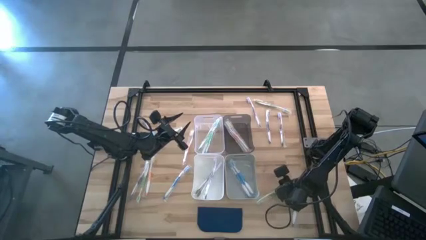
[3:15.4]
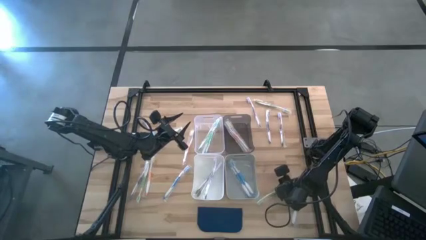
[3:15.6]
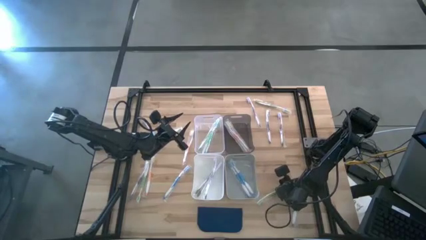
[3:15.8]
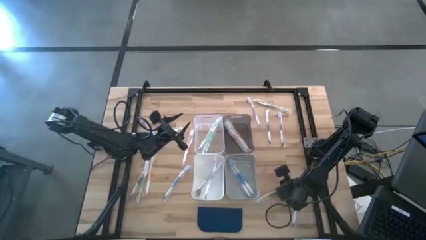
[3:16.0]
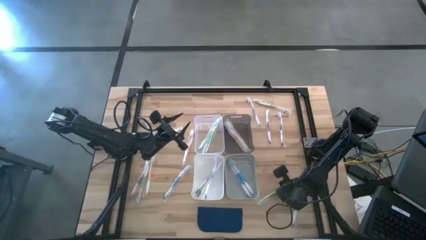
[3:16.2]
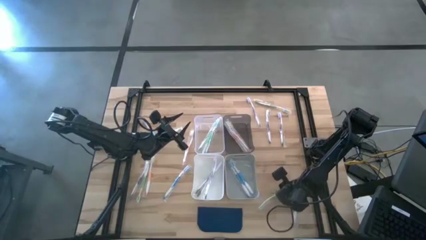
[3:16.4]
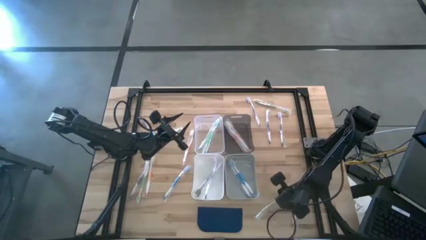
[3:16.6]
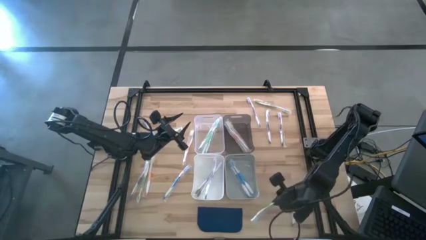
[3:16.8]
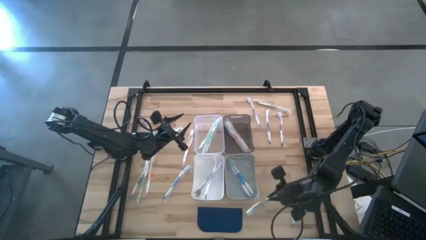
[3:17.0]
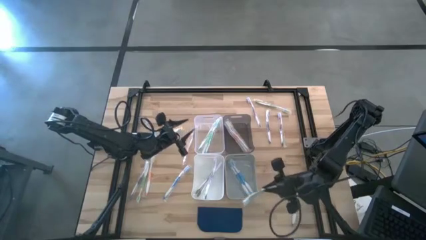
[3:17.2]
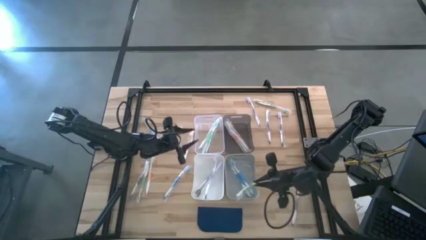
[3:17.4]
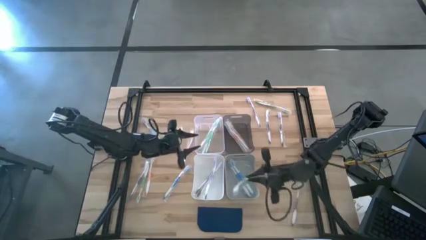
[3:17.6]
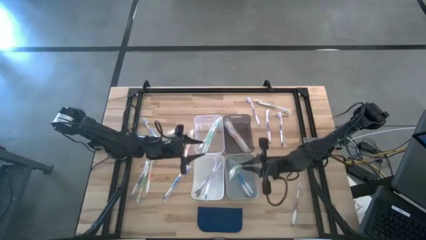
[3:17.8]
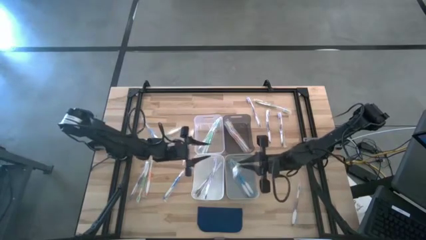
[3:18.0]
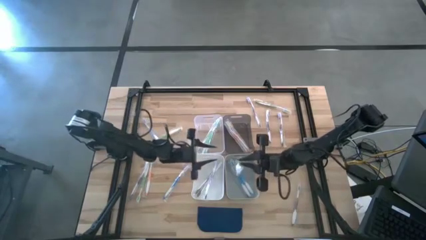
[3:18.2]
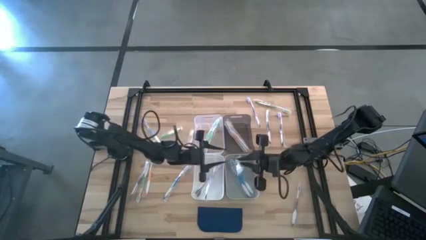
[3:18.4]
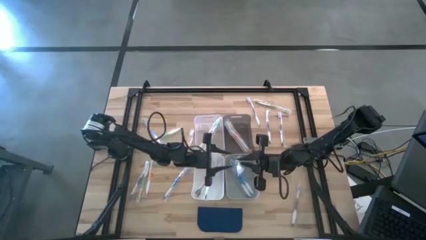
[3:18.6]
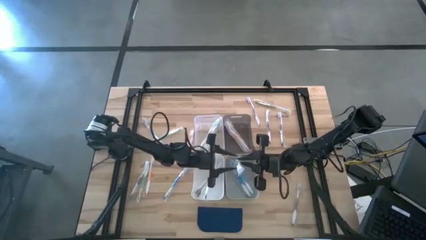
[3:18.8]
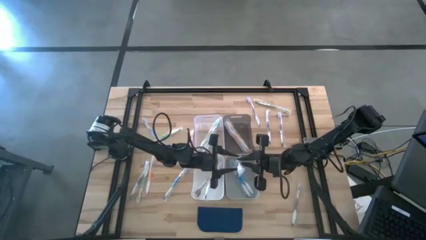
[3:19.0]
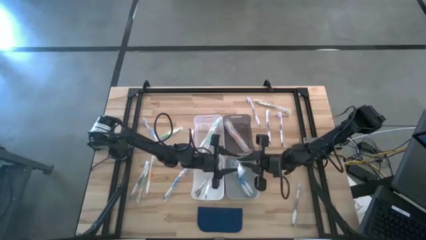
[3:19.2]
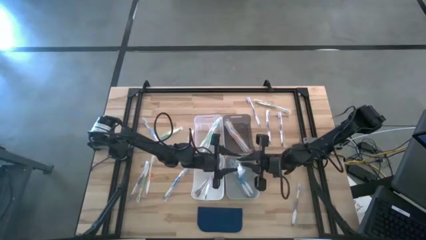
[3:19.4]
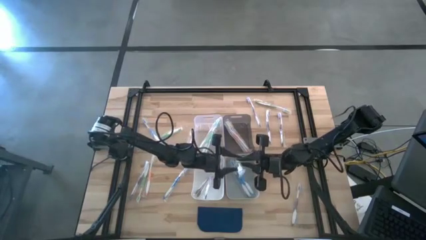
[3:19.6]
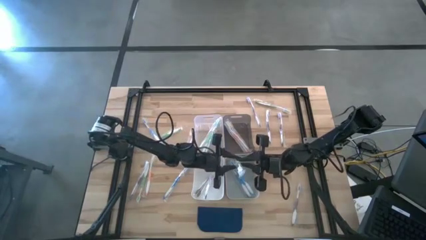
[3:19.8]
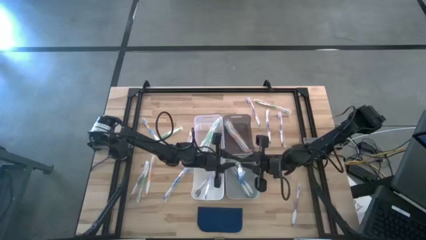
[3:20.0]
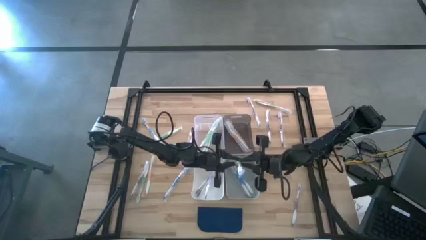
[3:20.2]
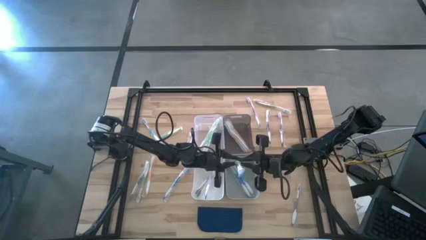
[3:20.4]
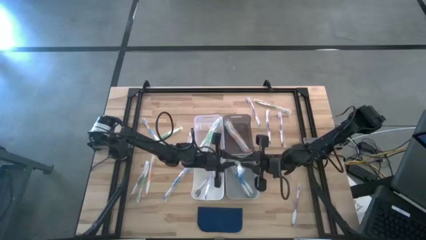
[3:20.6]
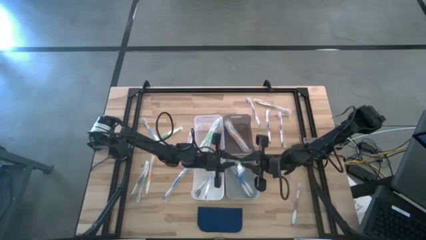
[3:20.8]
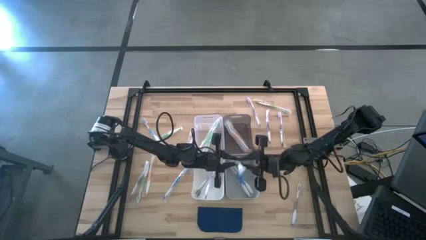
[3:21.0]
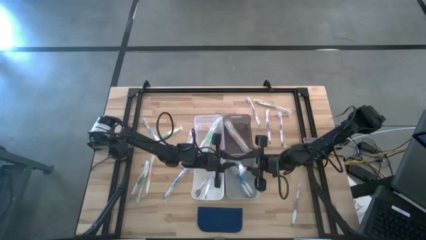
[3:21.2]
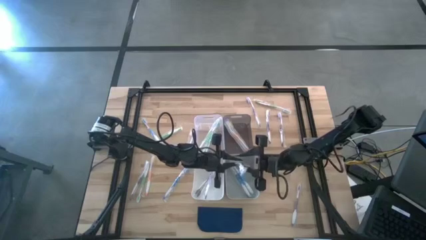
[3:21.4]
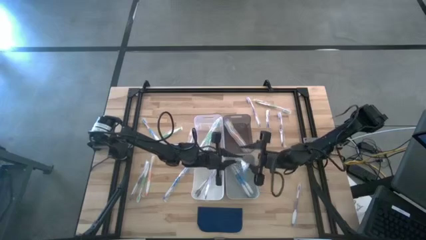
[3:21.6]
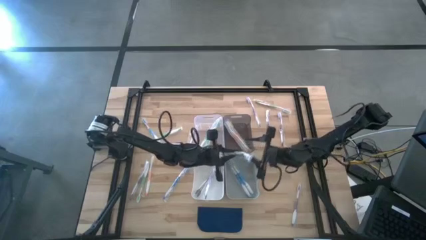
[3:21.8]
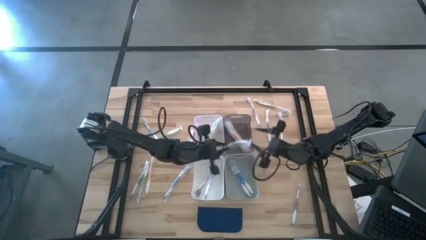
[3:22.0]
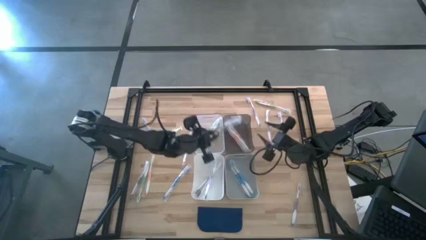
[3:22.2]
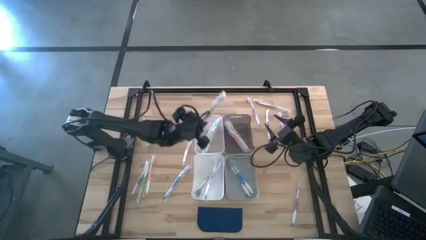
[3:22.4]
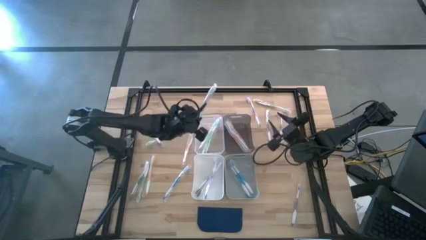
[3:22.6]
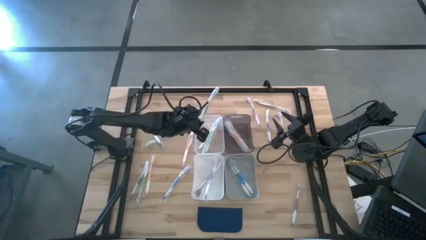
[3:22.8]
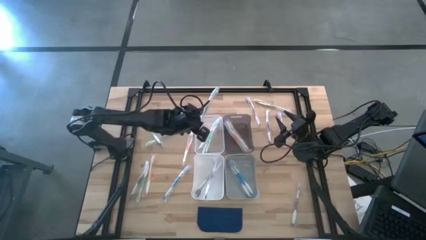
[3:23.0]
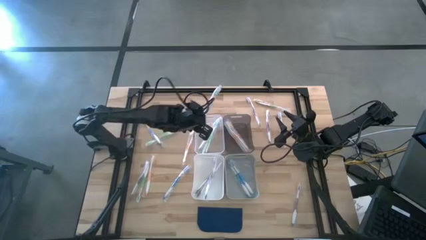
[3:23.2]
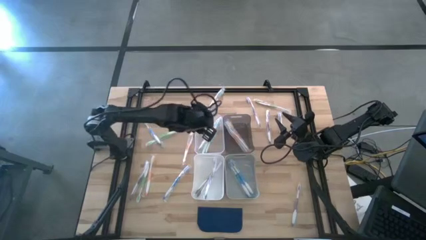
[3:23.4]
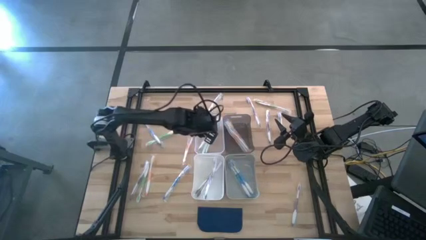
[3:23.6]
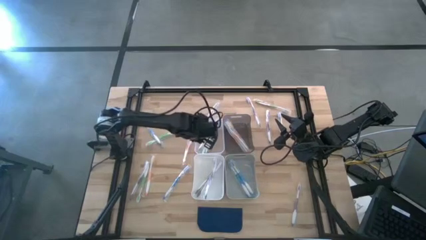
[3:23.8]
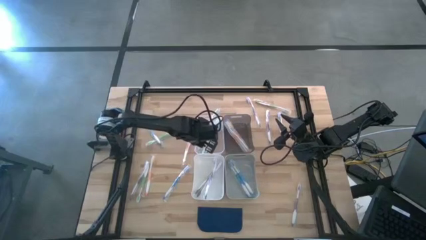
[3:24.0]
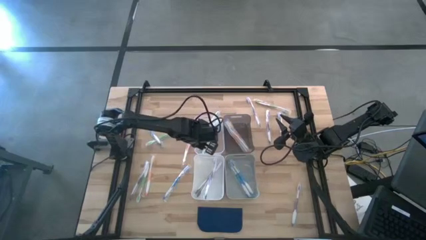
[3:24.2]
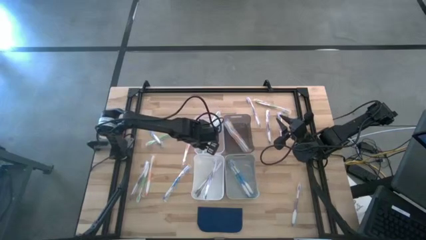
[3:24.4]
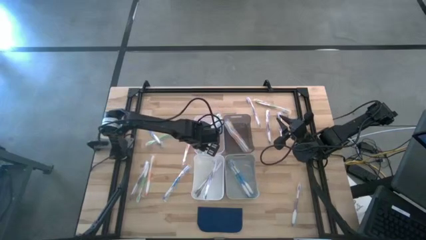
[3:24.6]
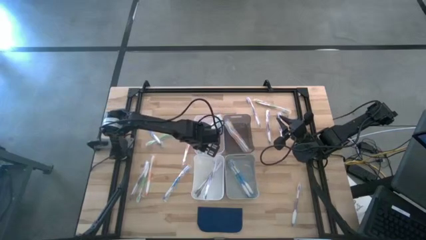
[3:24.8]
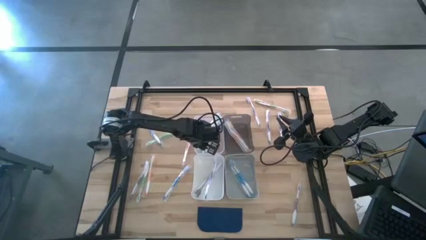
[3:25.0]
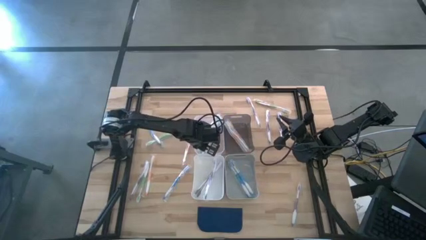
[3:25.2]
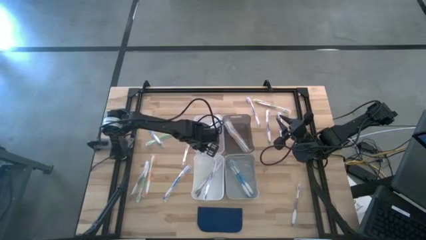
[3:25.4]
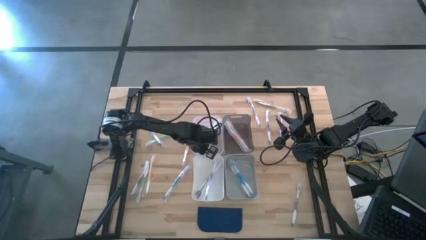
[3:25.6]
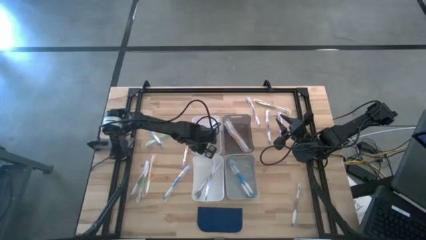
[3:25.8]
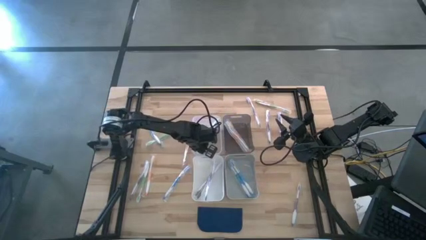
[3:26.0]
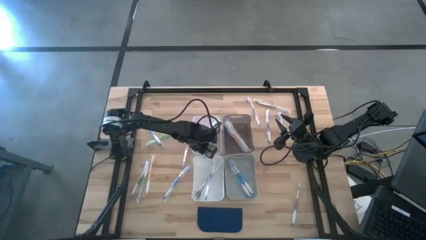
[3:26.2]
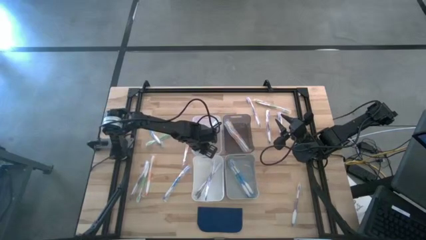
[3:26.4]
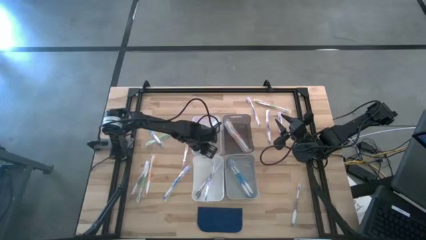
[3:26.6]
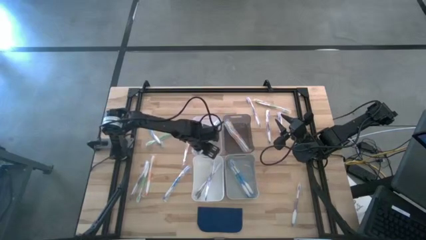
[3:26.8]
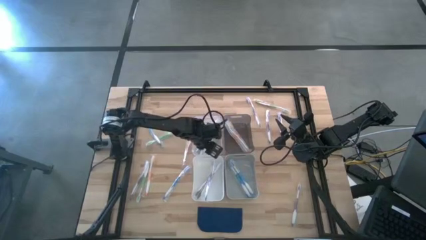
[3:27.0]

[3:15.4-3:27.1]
Task: Pick & Place Toothbrushes
Put the green toothbrush into the transparent bin

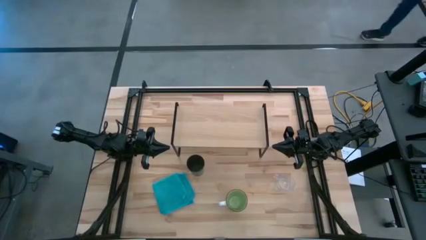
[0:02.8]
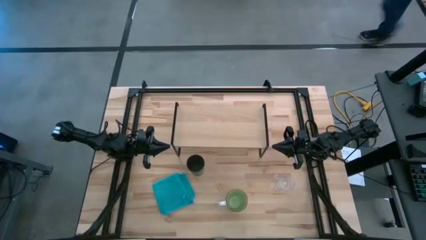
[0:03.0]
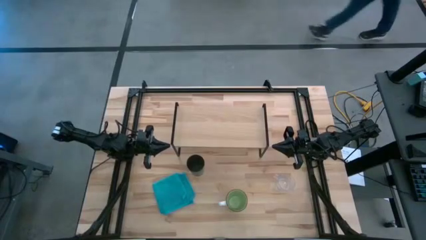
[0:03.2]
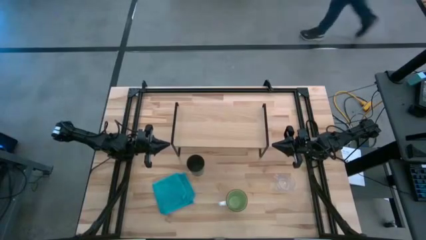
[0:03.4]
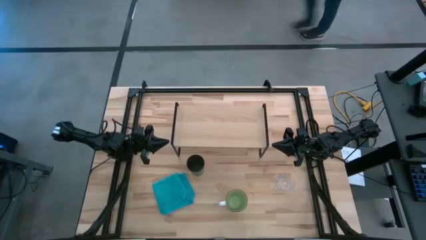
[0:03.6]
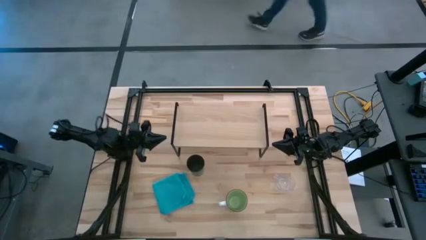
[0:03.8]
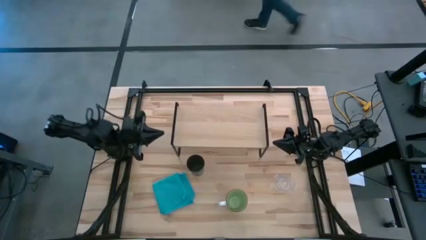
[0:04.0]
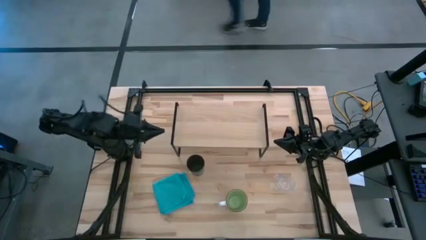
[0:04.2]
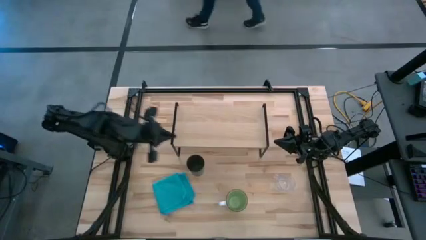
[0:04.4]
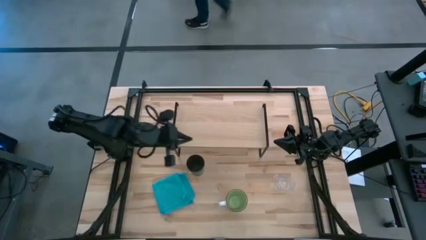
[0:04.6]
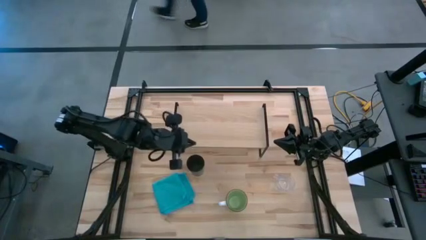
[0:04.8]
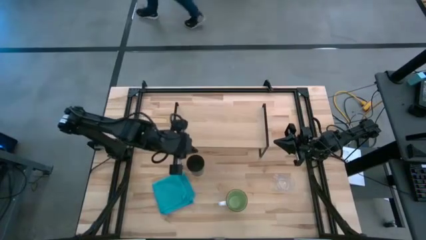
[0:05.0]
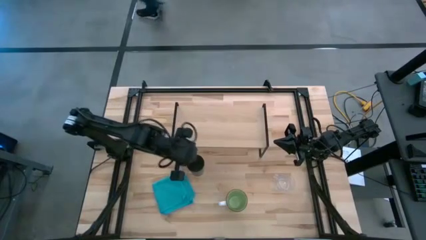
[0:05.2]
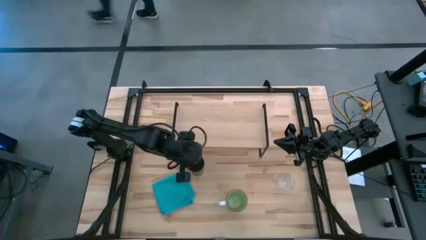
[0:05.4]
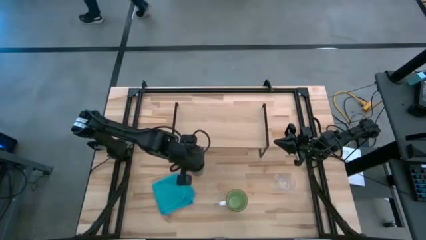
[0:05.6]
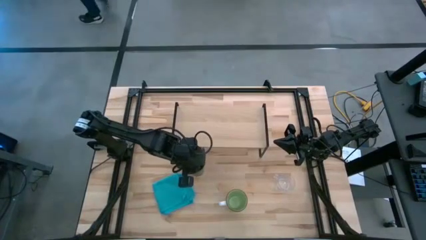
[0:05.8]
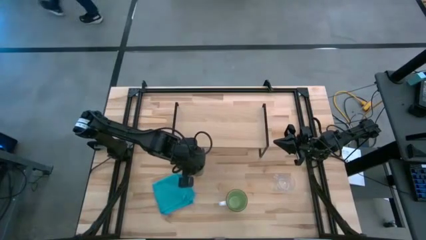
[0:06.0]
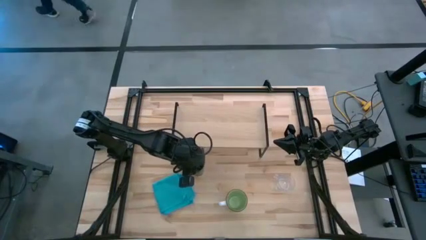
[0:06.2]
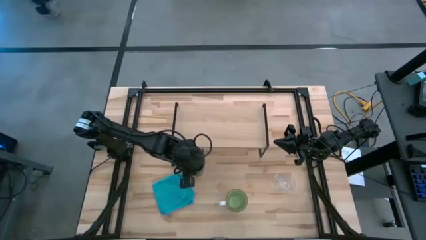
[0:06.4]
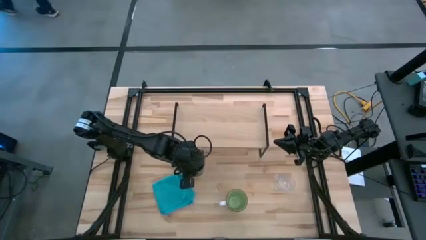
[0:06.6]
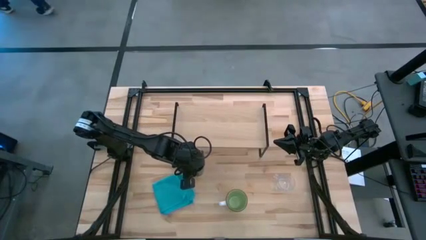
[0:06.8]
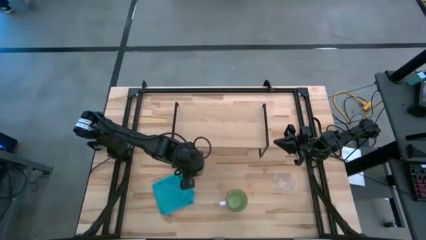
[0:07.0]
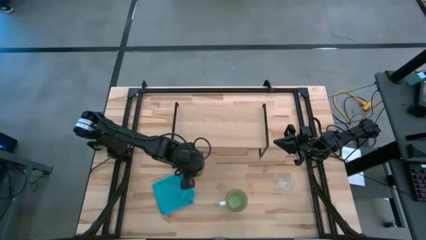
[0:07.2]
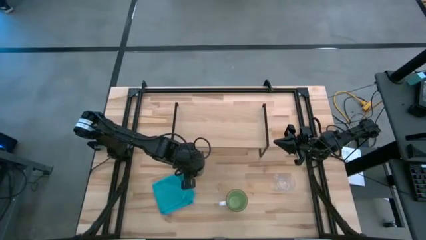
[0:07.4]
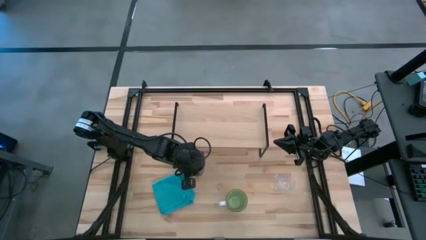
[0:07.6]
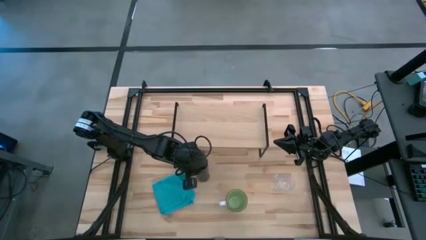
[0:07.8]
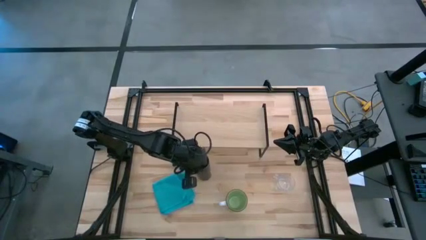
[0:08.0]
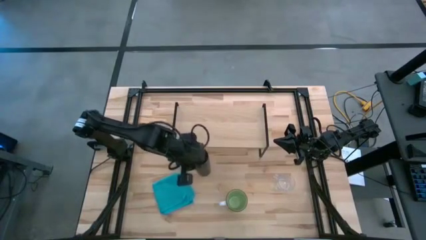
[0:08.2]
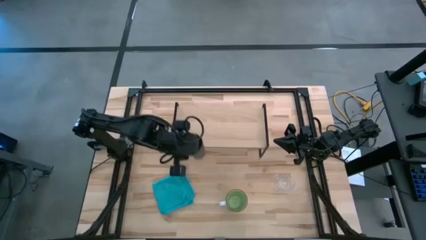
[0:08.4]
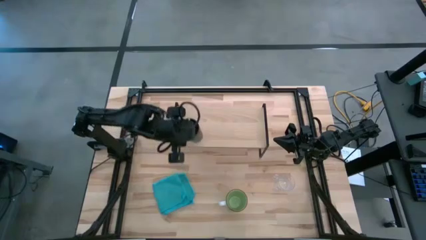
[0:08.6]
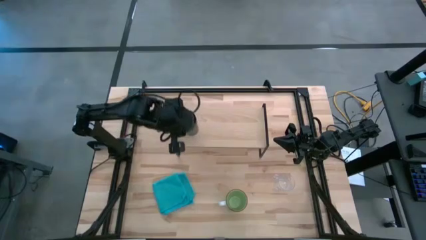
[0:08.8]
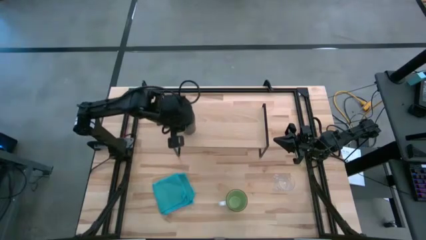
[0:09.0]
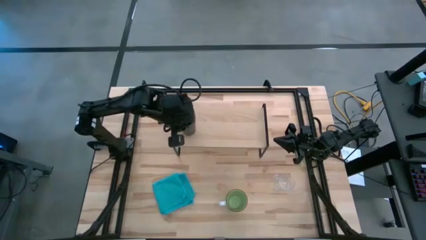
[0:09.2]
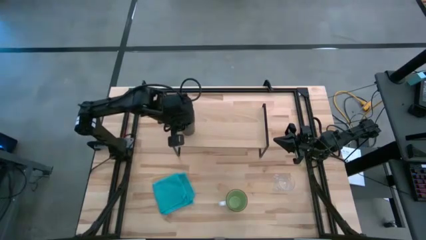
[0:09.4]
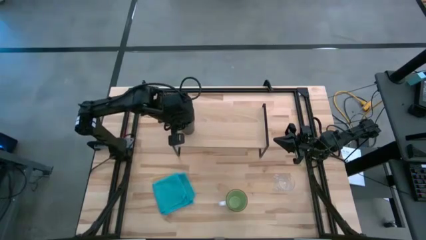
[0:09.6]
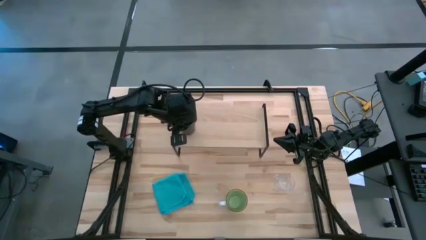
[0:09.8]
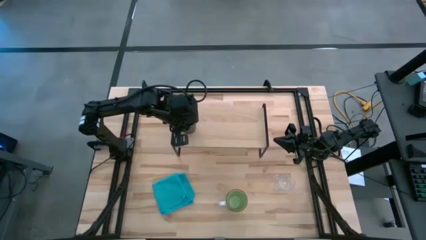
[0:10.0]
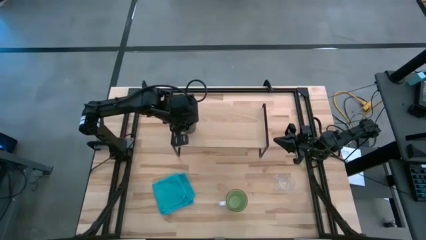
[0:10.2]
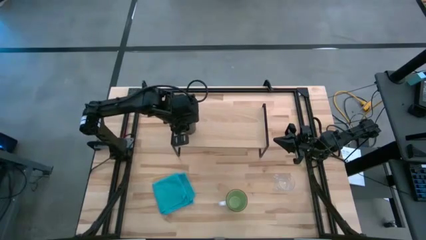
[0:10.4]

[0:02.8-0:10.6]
Task: Stack small to large cups/mugs on shelf
Put the black cup on the shelf
